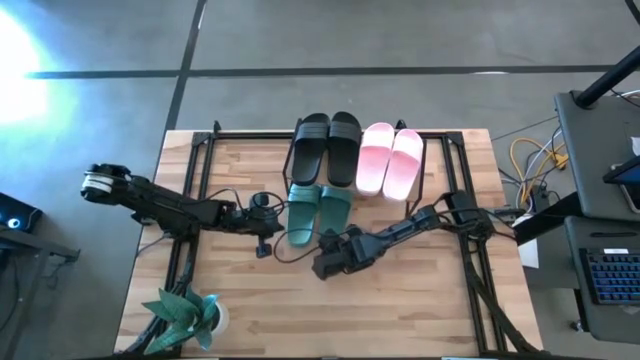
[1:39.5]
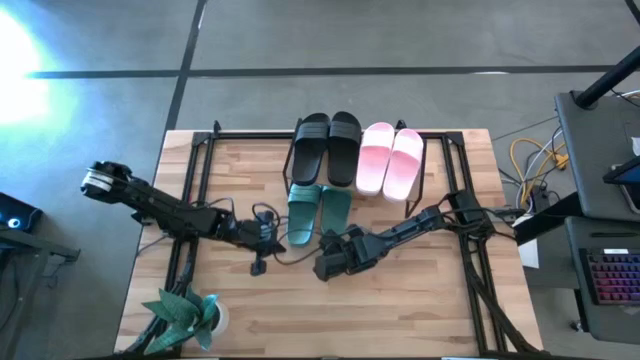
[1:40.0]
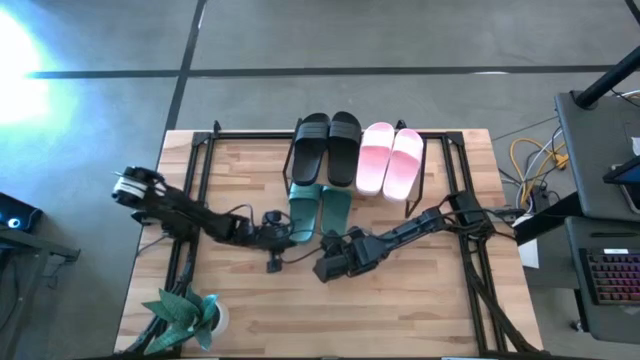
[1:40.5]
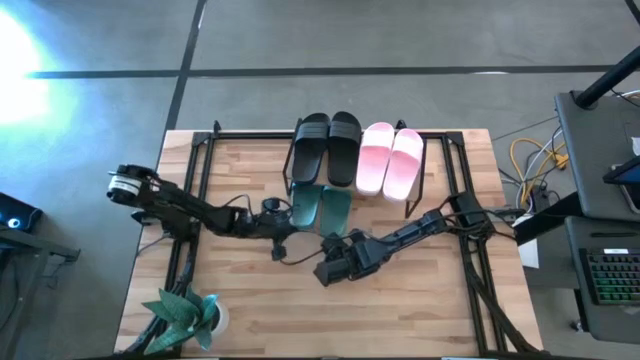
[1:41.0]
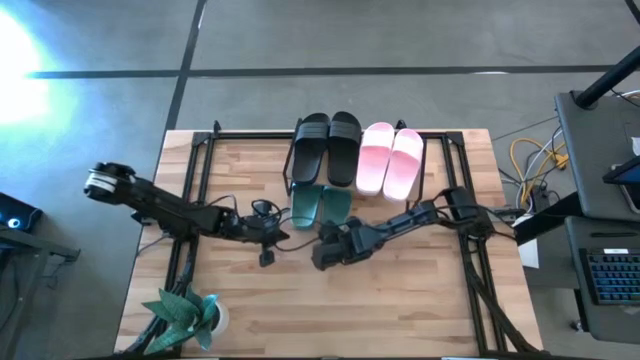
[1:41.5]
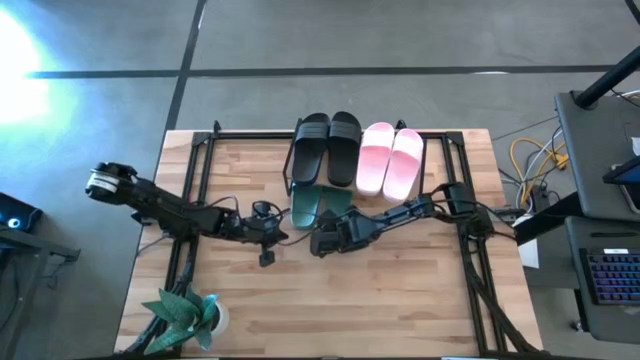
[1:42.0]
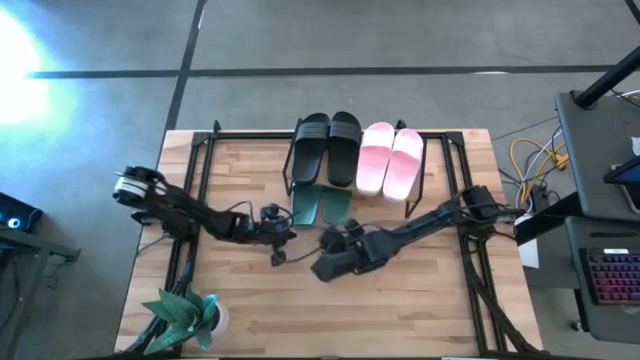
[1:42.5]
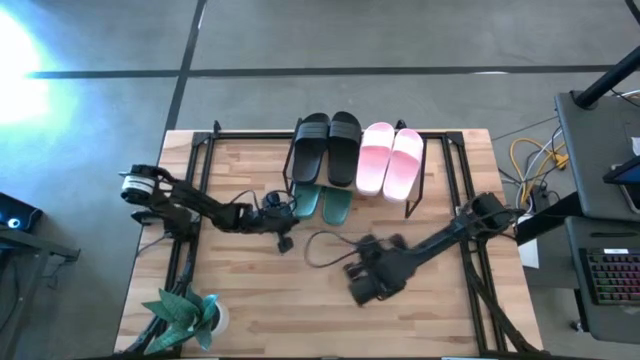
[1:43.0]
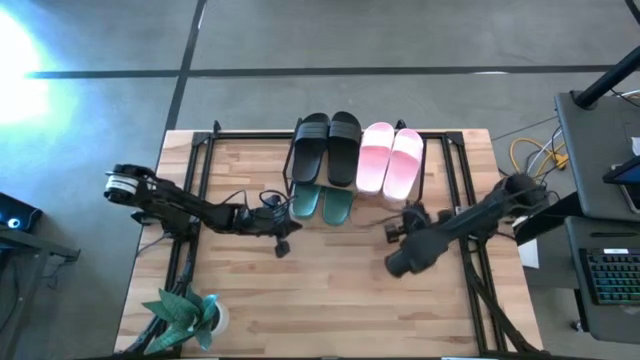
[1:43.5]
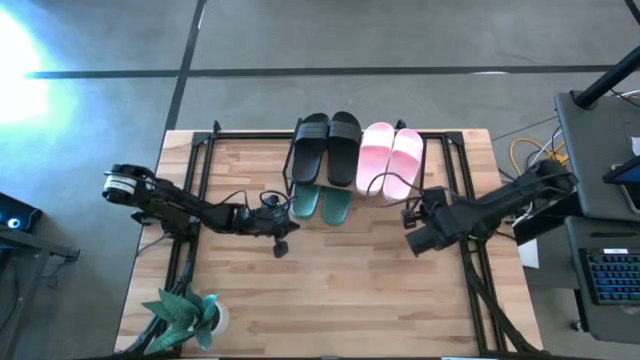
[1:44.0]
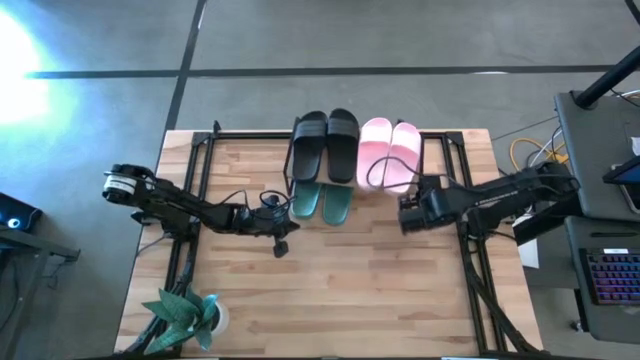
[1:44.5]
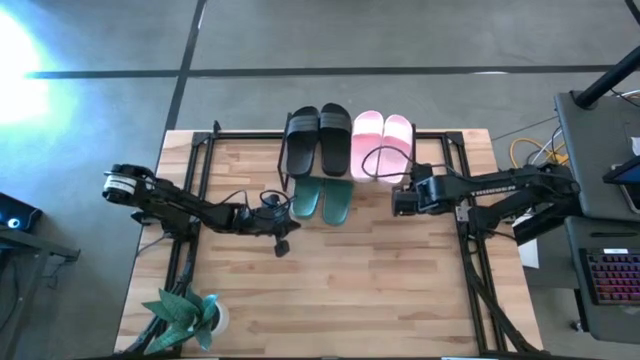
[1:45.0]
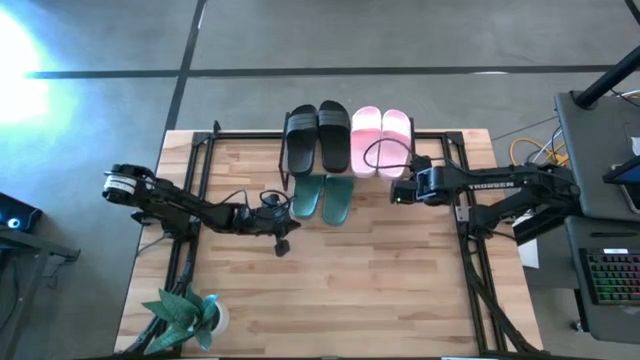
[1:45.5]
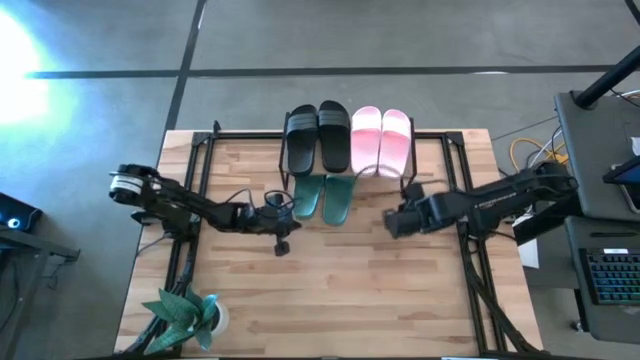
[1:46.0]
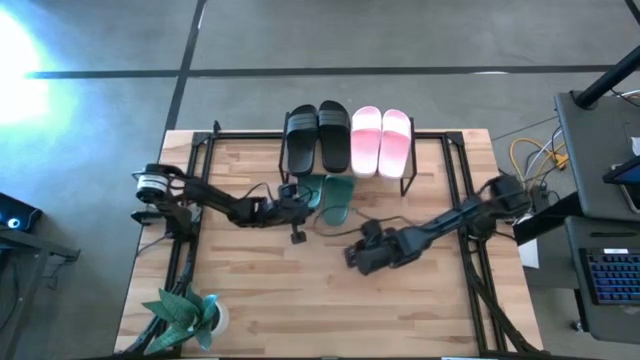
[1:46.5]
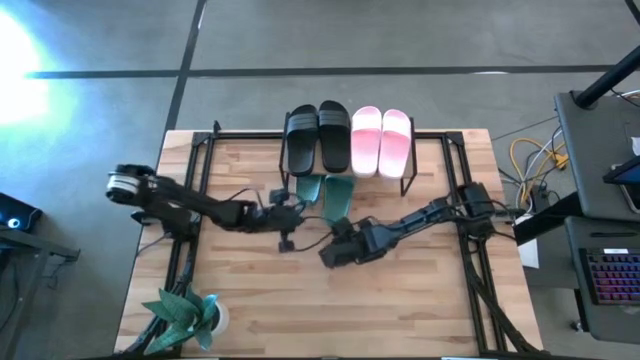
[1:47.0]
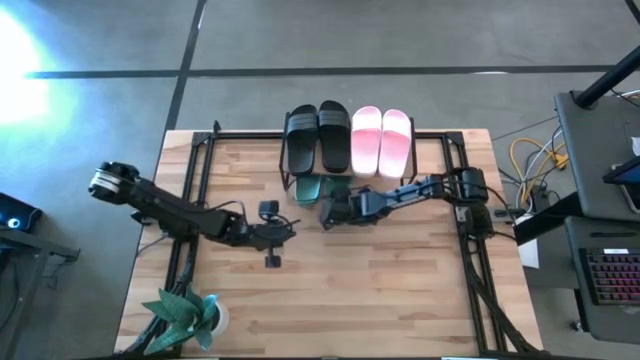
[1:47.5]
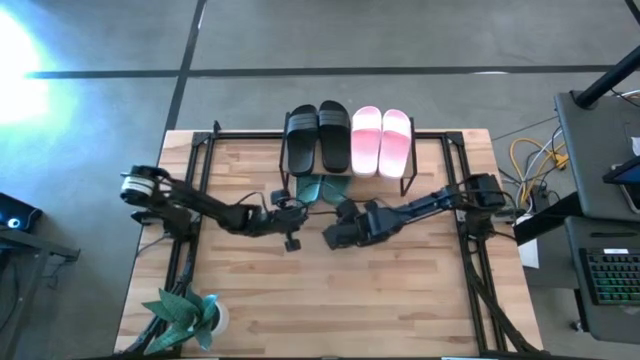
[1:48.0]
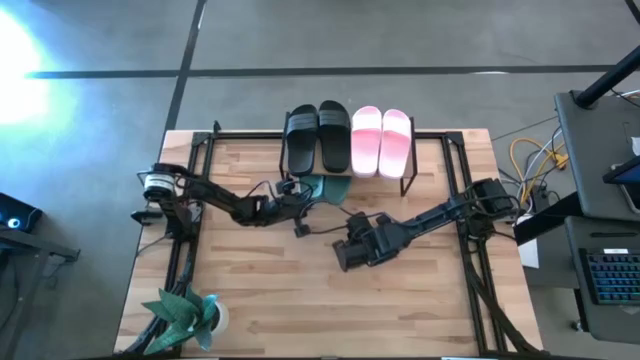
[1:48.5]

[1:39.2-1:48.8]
Task: Pick and place slides into the shelf
Adjust the green slippers

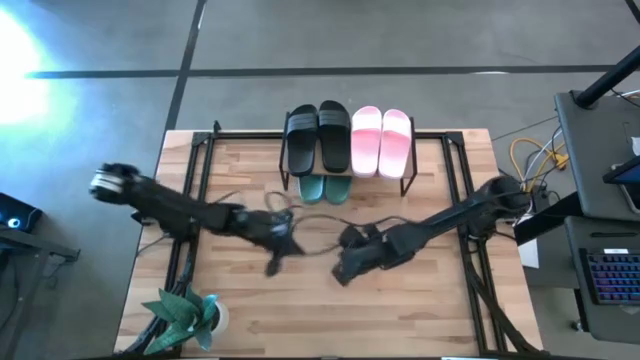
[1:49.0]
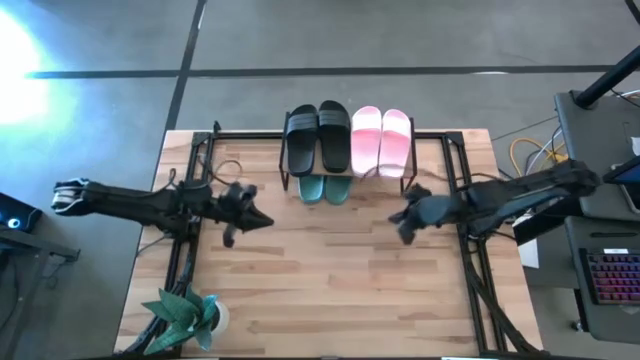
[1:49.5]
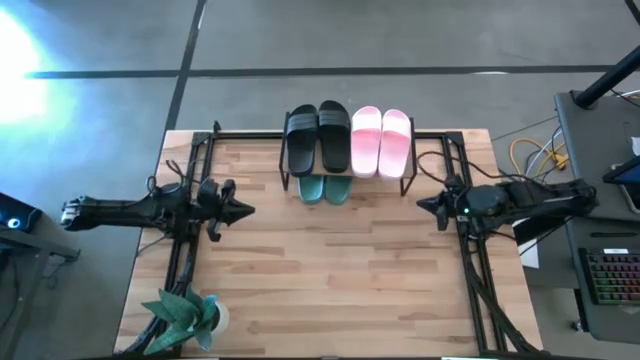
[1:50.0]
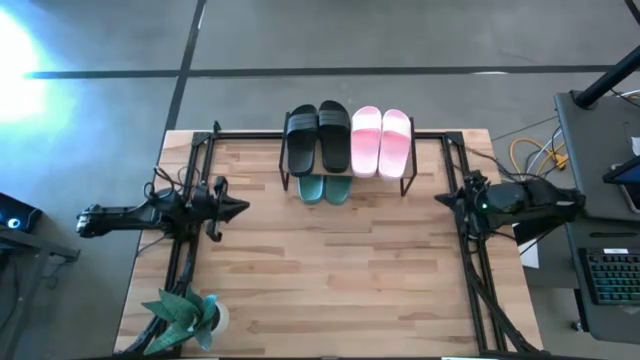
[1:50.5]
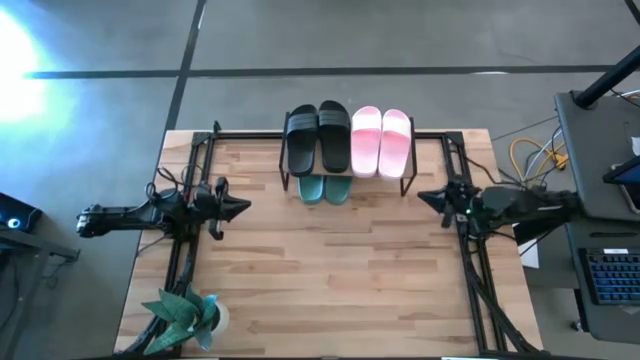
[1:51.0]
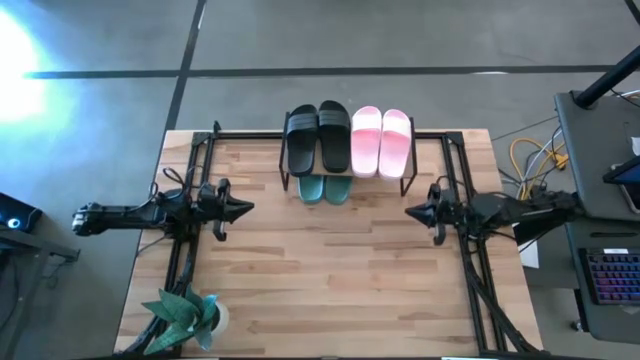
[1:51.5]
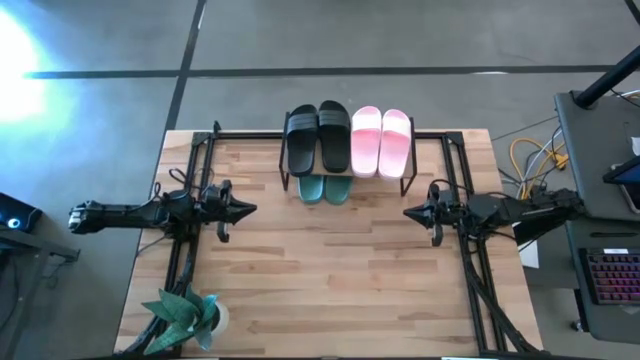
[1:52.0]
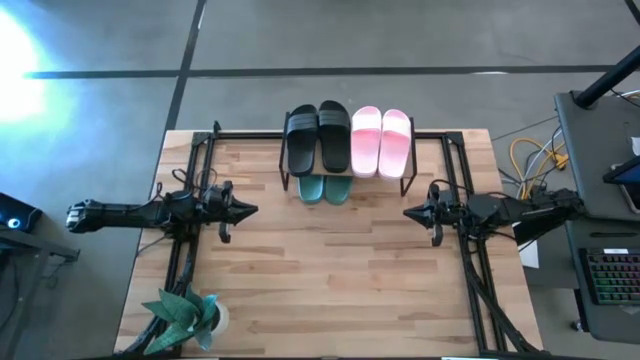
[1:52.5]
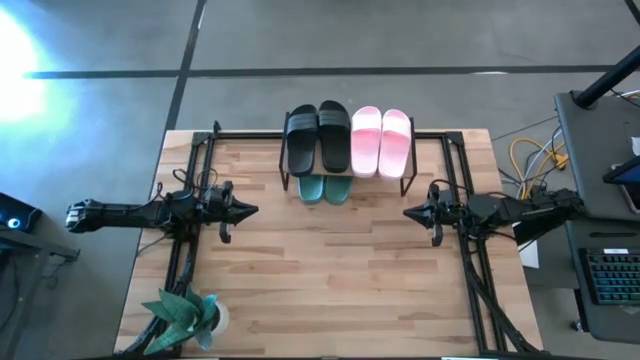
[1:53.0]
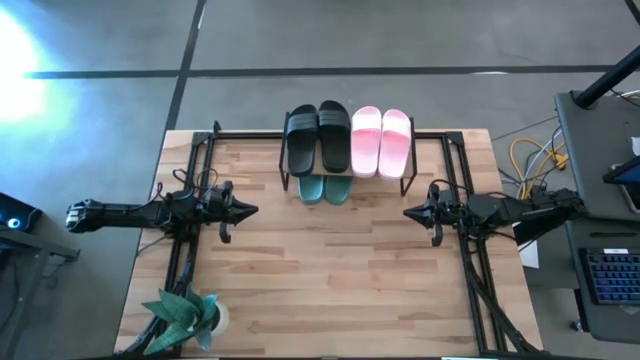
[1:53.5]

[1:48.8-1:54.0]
Return to Home Position

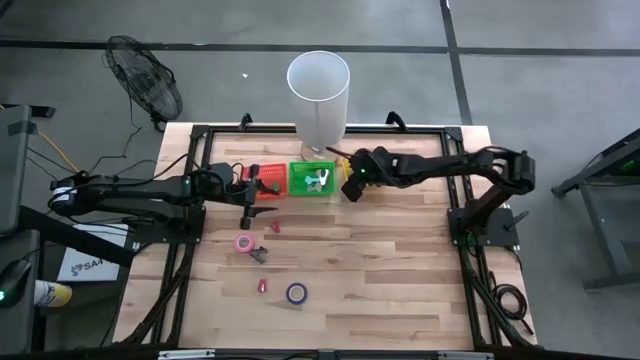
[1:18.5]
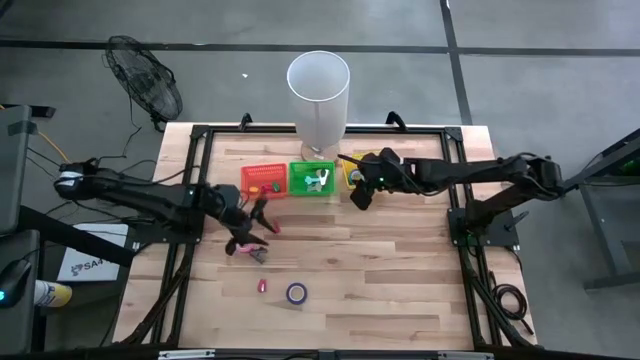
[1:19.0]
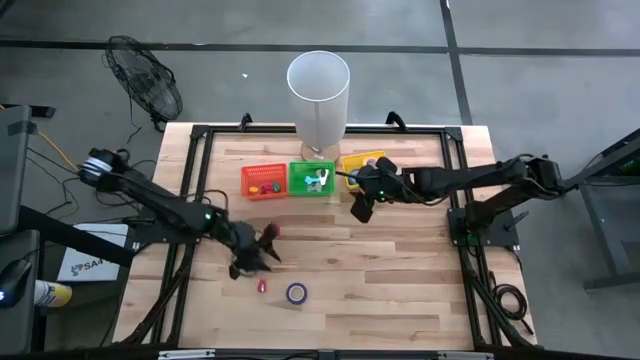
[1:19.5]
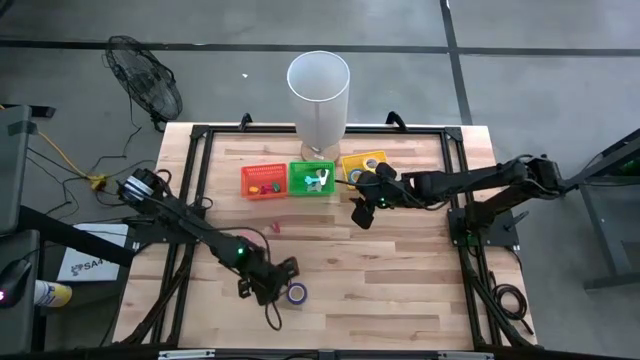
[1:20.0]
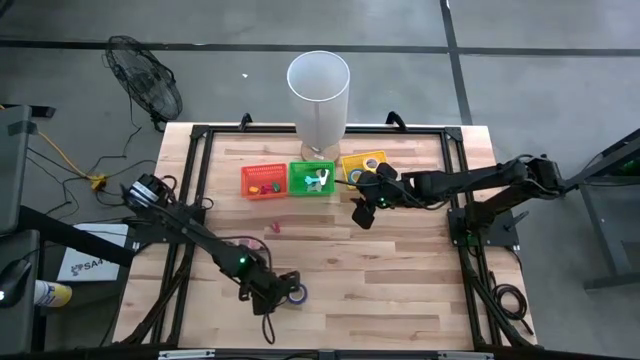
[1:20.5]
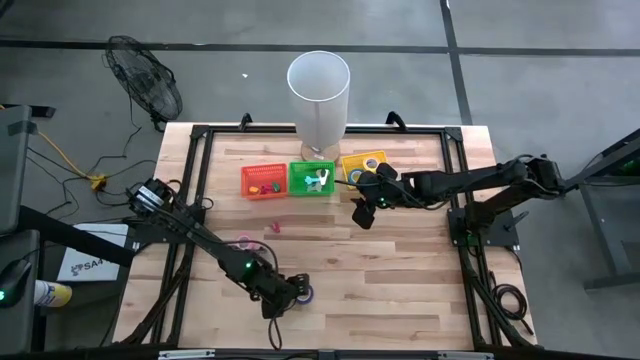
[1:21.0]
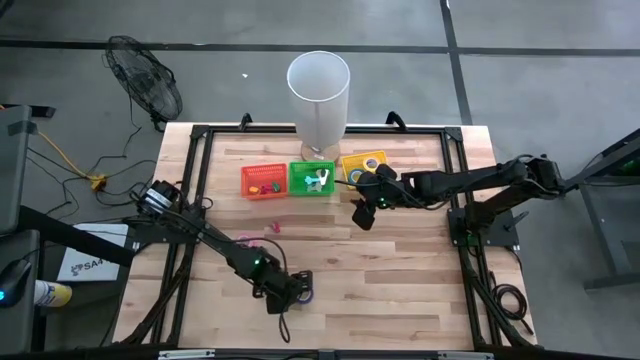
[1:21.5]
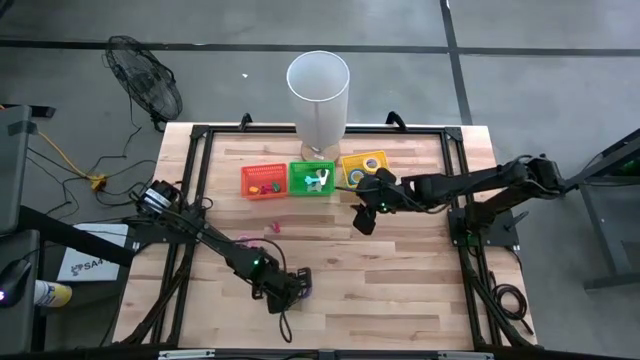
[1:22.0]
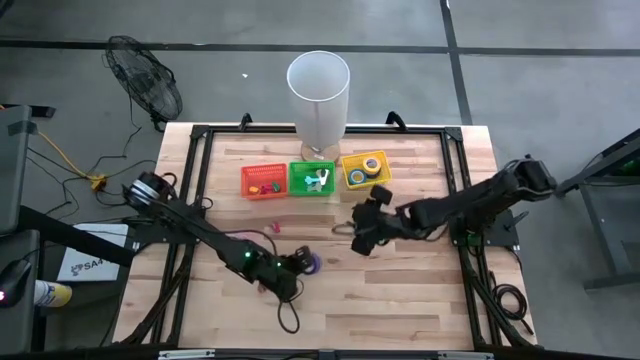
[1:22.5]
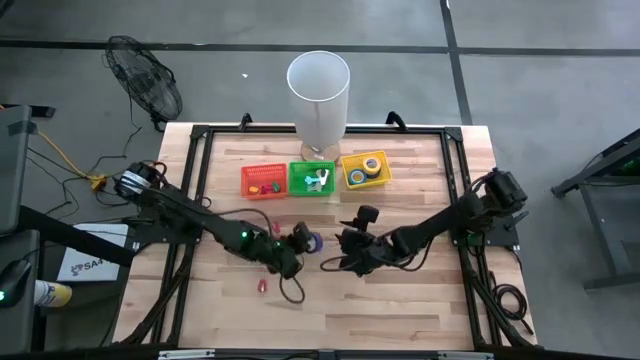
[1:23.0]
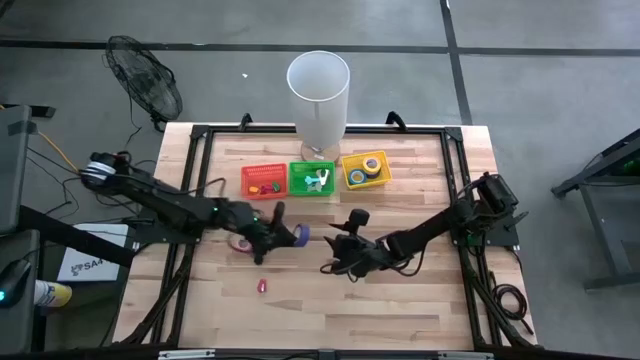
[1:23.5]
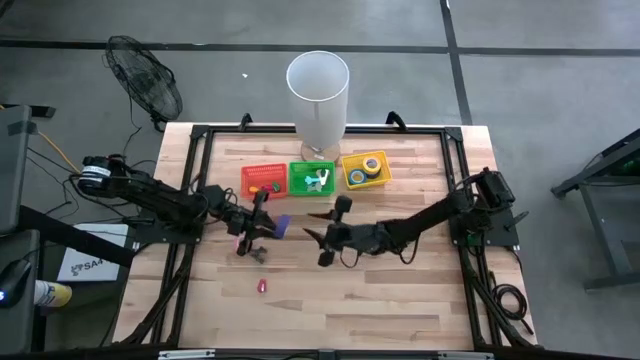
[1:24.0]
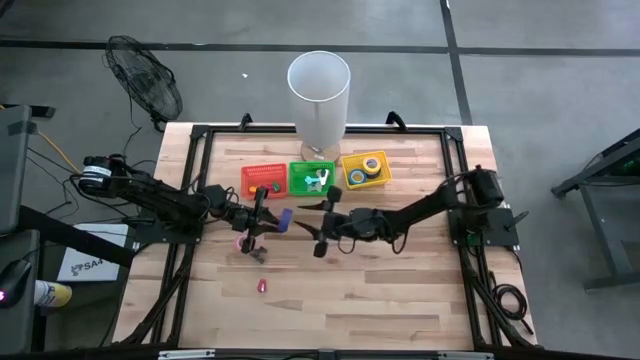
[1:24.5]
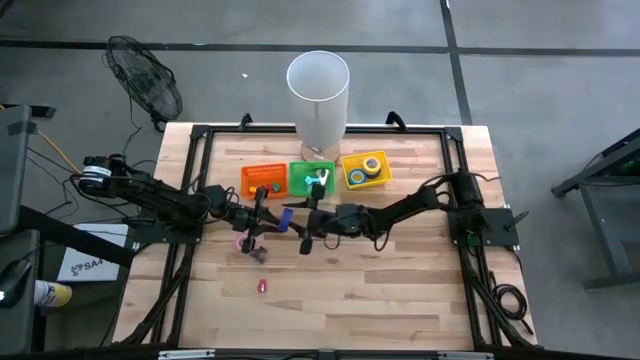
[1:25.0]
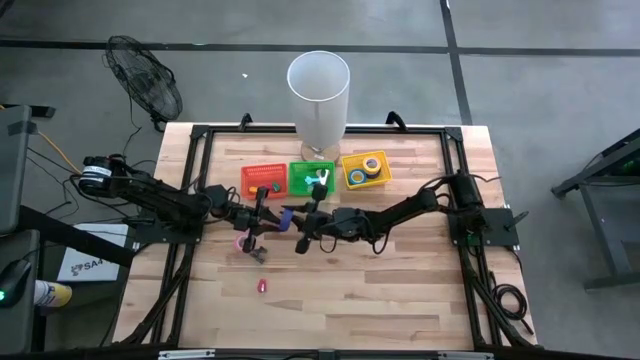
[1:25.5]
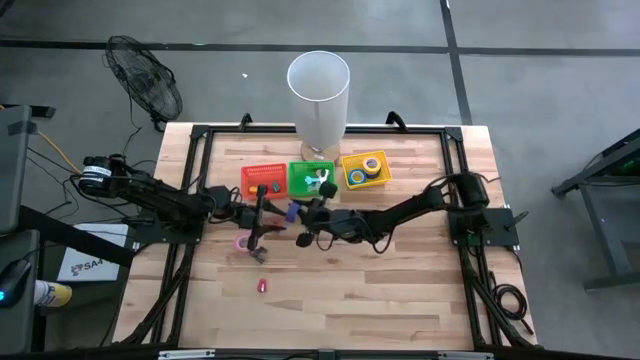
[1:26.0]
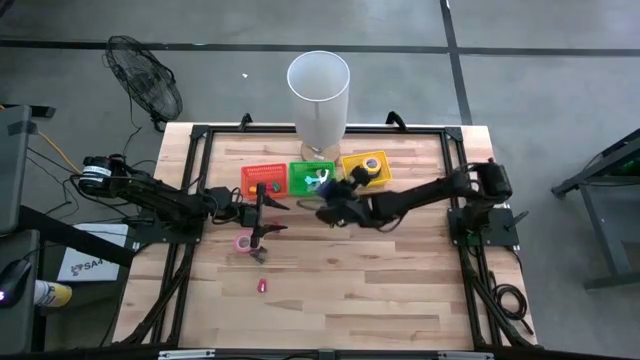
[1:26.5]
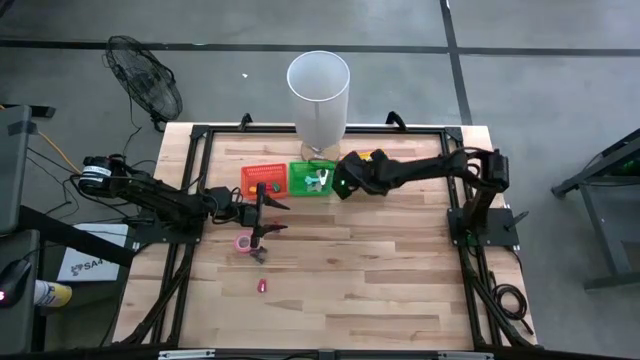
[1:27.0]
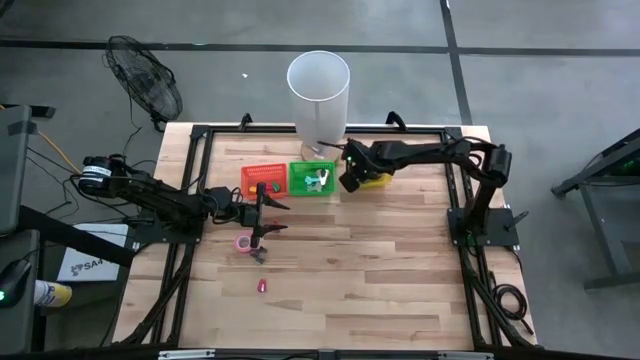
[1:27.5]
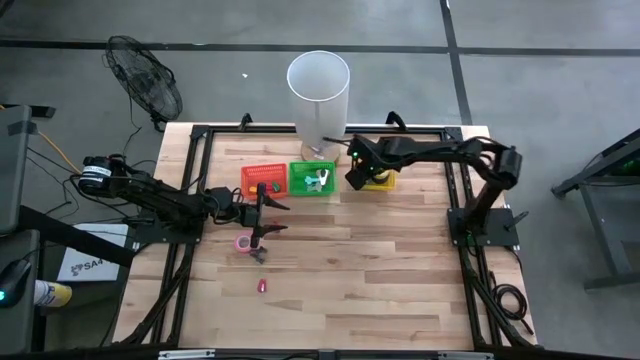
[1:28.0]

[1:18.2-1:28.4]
Task: Pick and place Stapler, Stapler remover, tape
Put the blue tape into the yellow bin
